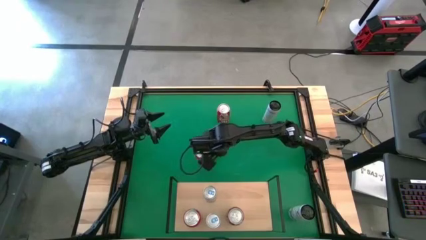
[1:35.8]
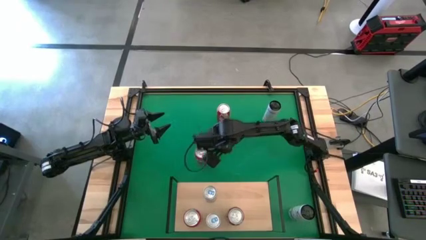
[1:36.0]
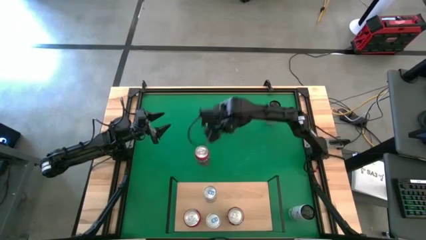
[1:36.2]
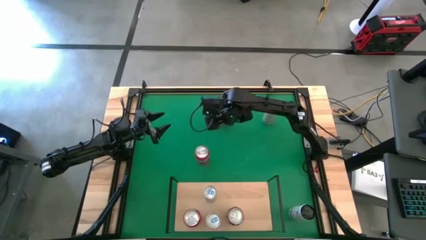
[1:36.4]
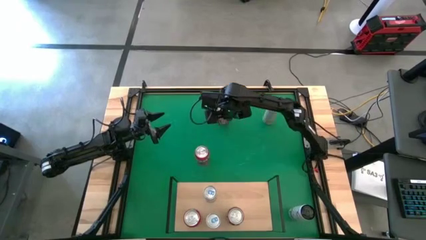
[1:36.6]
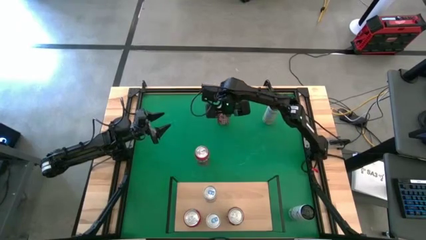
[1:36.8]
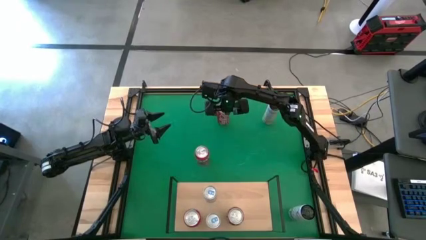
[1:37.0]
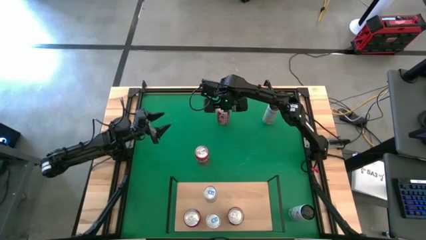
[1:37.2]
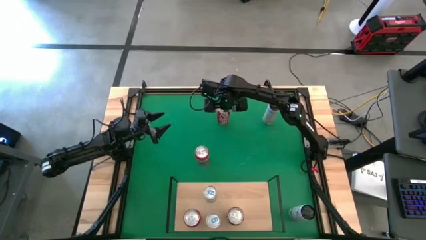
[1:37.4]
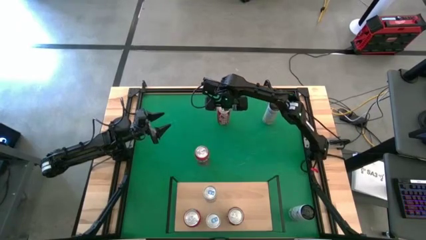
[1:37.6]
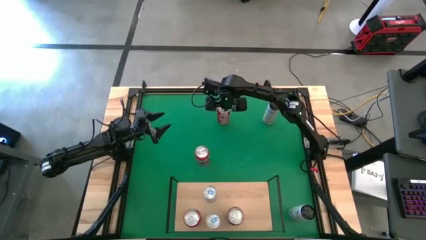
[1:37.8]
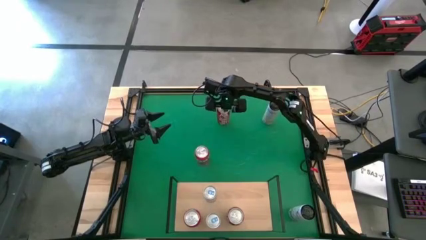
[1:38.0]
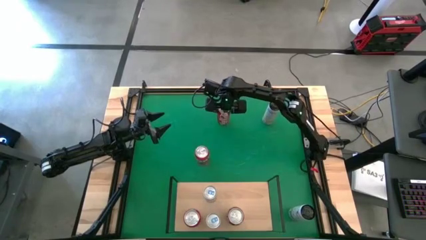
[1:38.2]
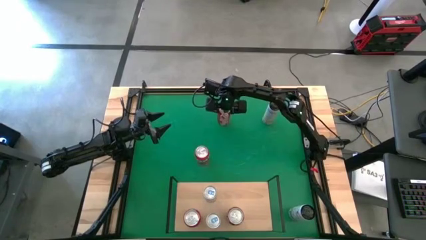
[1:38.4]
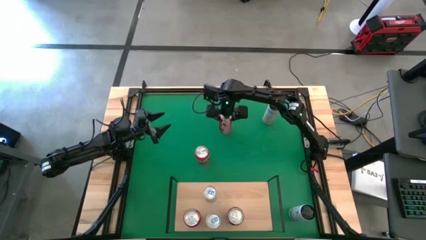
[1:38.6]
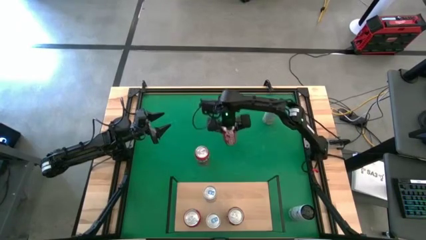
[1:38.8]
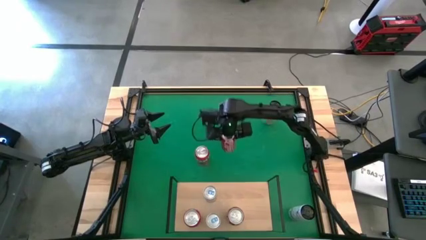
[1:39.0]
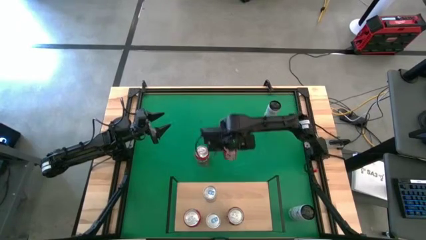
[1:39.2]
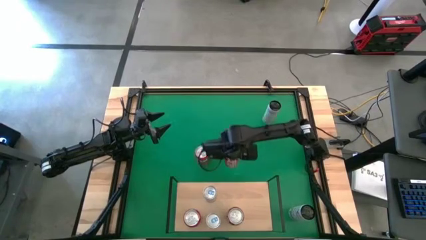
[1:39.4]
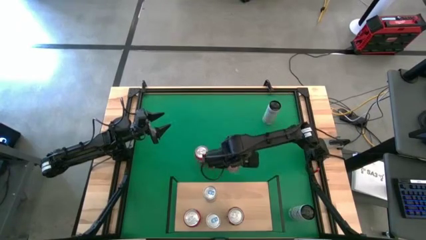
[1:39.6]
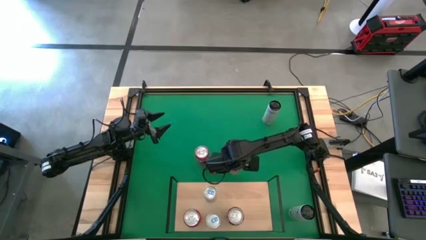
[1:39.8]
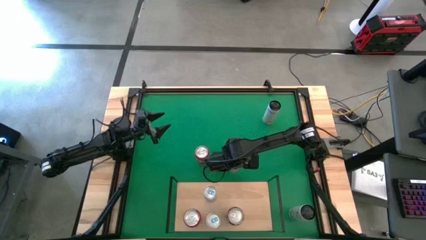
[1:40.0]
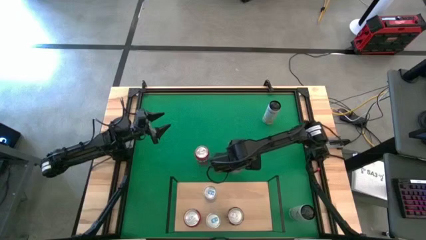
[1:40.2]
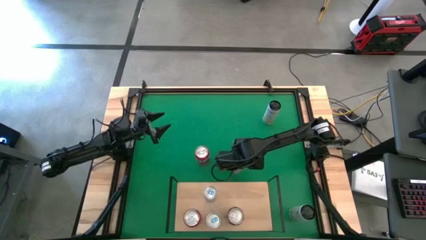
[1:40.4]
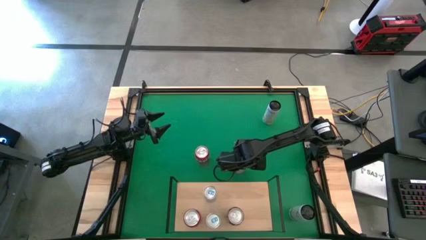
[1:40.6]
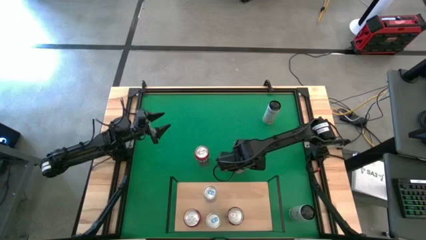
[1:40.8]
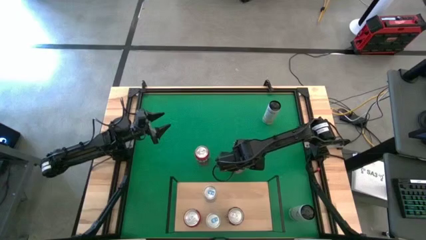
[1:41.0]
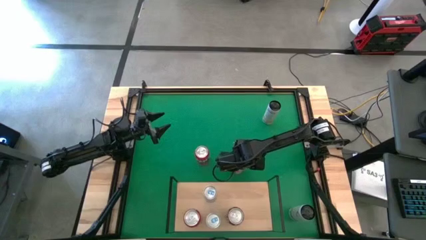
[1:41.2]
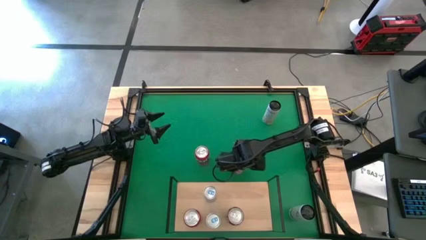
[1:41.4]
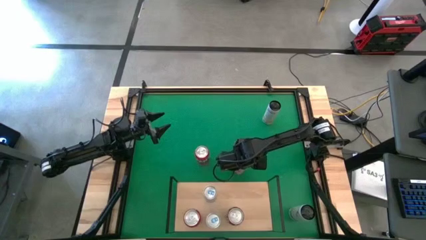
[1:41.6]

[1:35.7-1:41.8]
Task: Place canned beverage on shelf
Move the red soda can to the center of the table beside the orange soda can

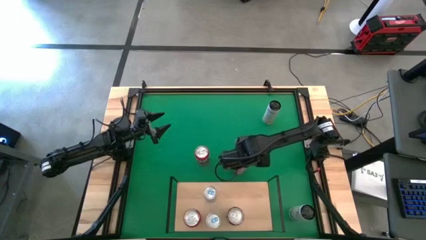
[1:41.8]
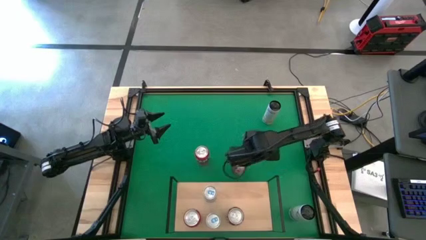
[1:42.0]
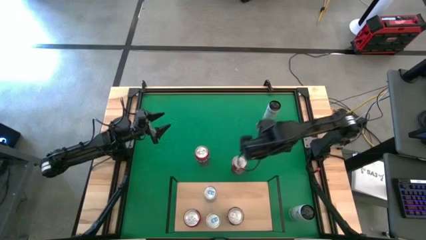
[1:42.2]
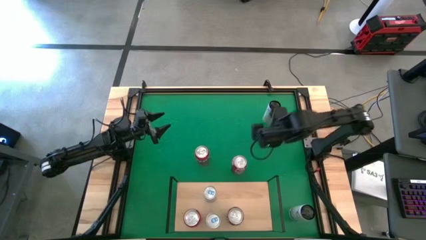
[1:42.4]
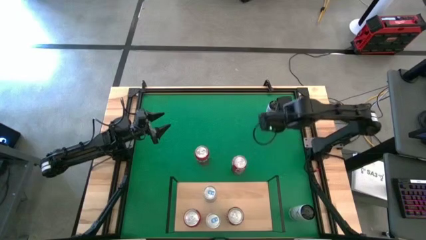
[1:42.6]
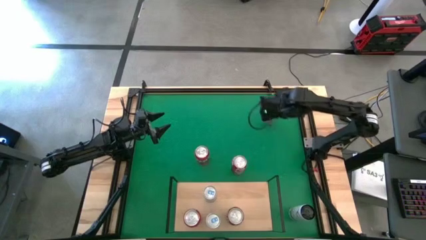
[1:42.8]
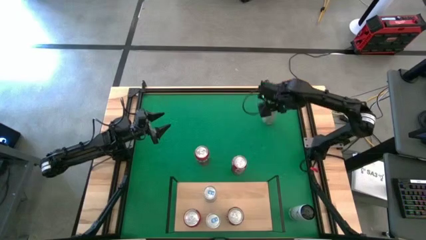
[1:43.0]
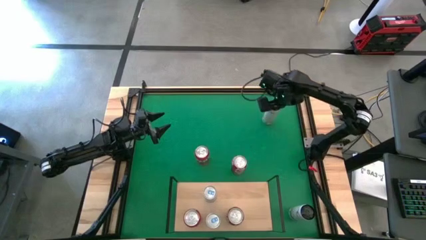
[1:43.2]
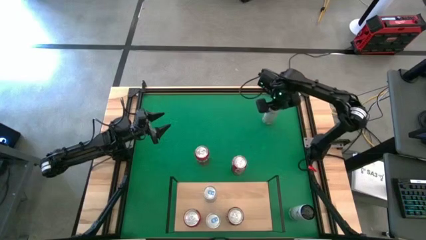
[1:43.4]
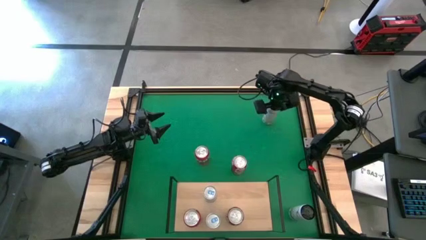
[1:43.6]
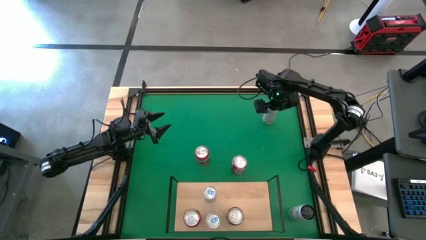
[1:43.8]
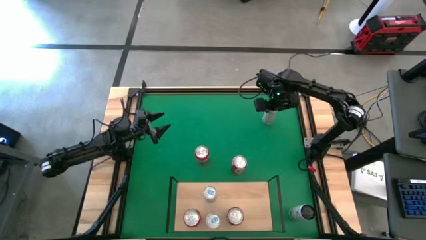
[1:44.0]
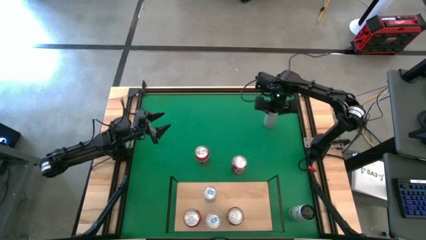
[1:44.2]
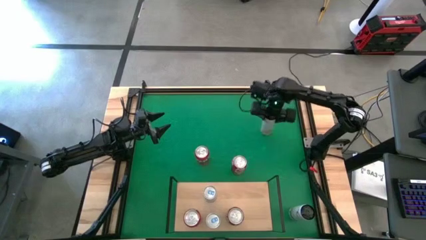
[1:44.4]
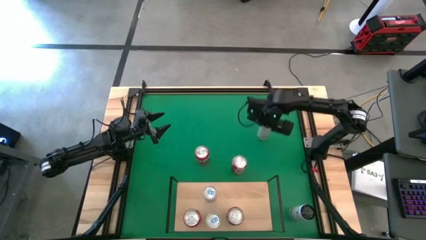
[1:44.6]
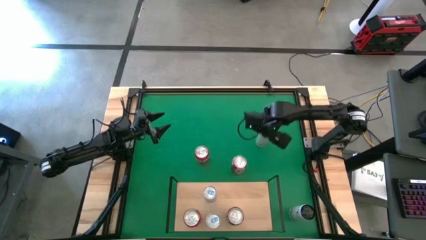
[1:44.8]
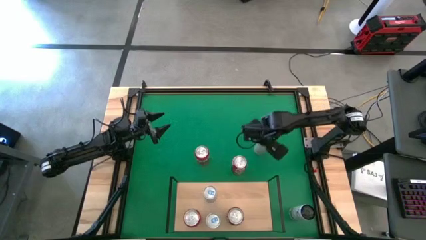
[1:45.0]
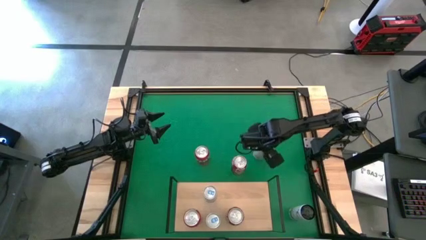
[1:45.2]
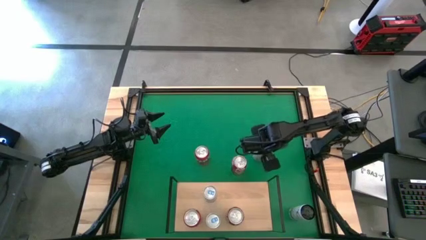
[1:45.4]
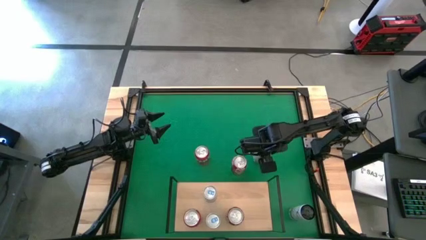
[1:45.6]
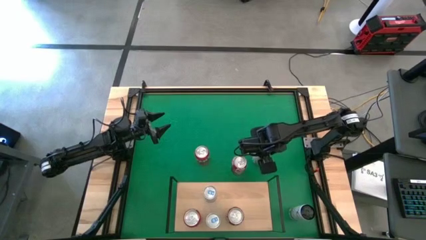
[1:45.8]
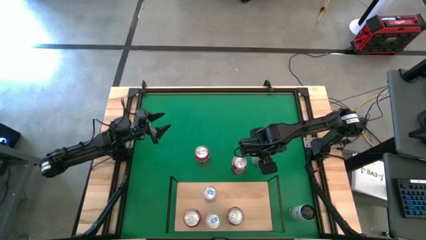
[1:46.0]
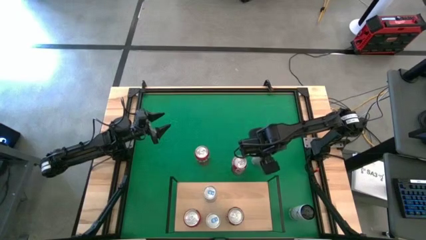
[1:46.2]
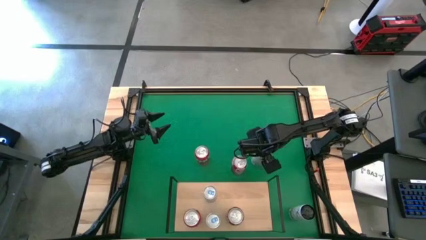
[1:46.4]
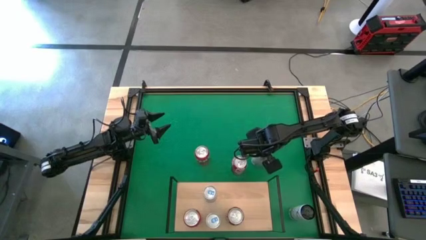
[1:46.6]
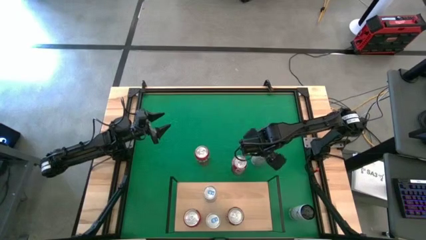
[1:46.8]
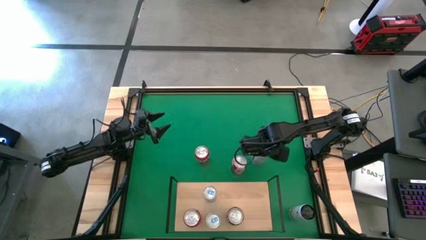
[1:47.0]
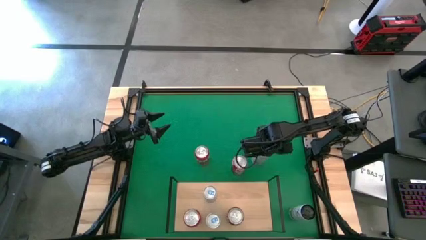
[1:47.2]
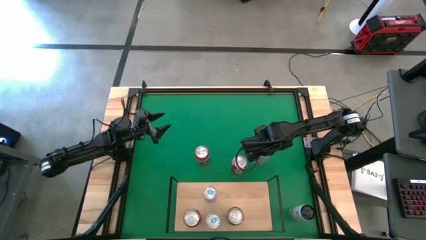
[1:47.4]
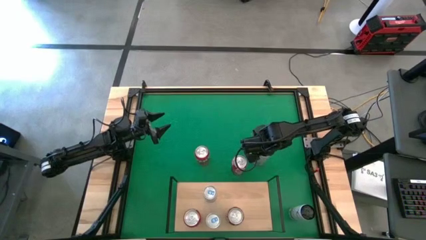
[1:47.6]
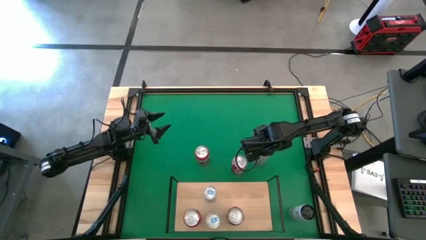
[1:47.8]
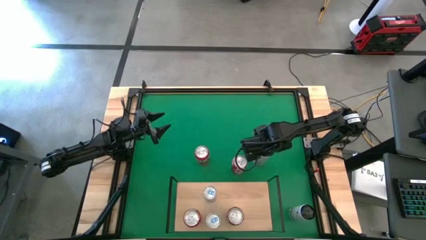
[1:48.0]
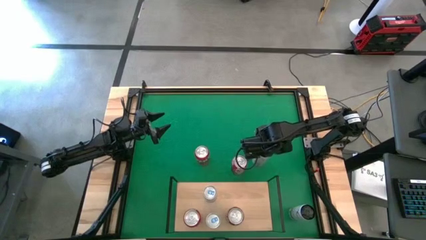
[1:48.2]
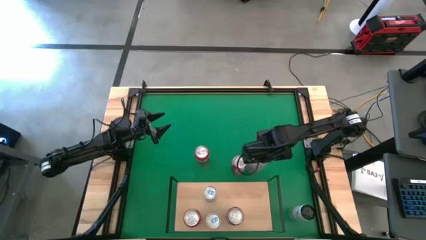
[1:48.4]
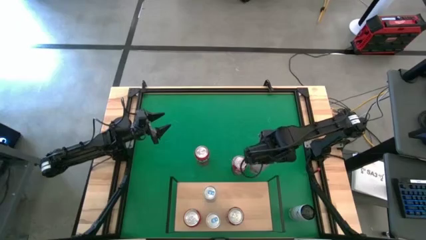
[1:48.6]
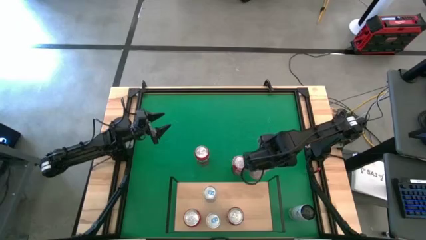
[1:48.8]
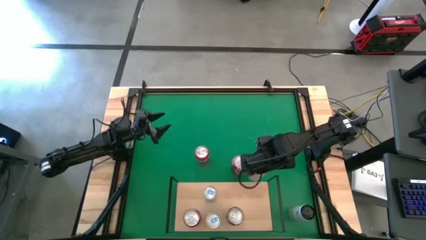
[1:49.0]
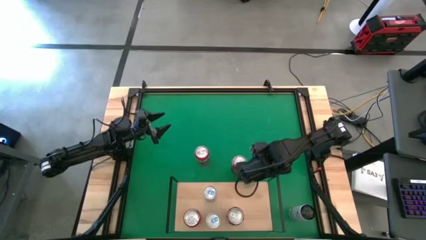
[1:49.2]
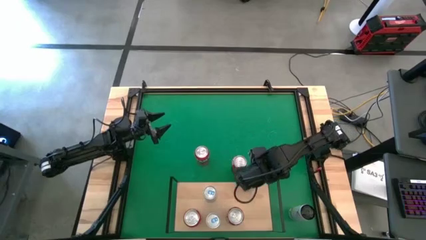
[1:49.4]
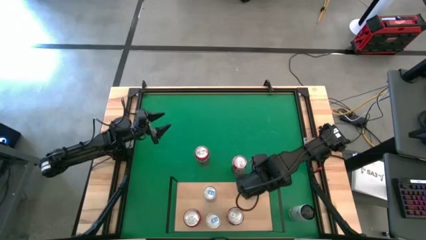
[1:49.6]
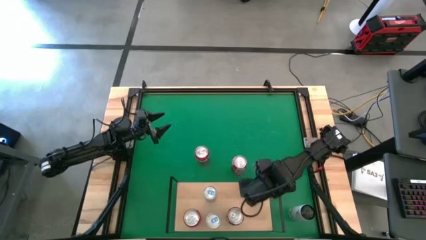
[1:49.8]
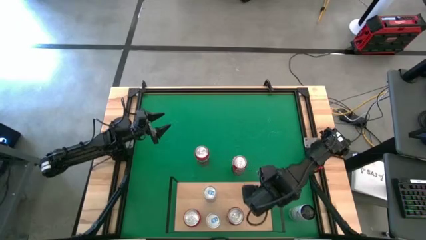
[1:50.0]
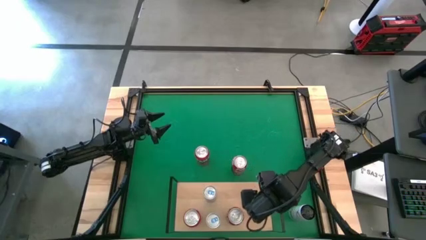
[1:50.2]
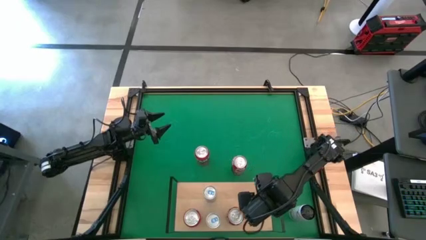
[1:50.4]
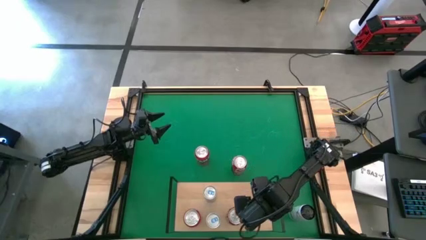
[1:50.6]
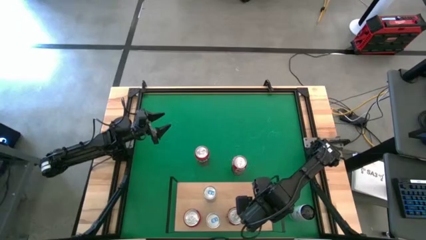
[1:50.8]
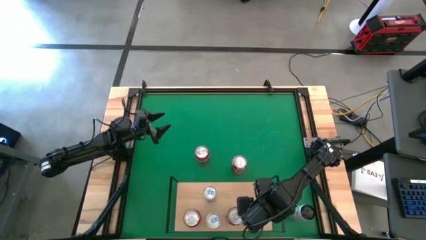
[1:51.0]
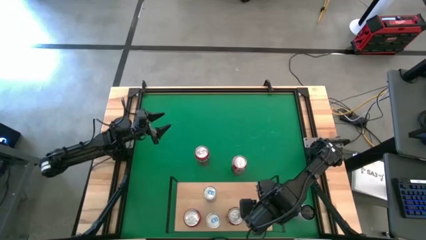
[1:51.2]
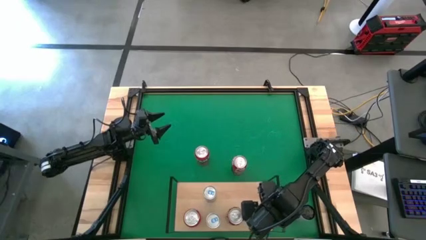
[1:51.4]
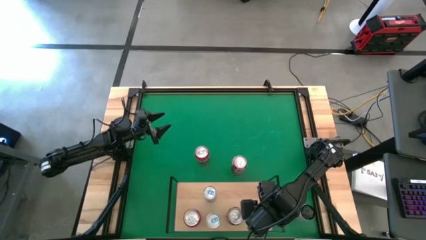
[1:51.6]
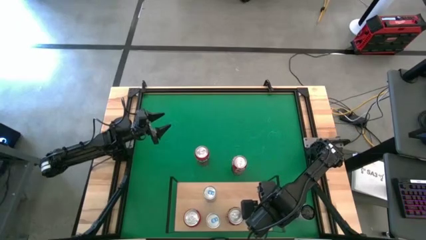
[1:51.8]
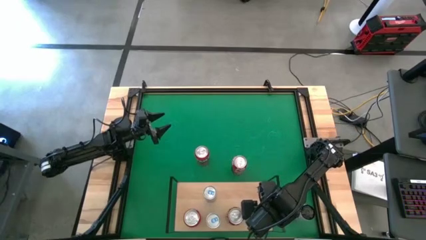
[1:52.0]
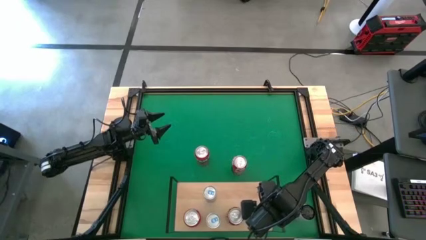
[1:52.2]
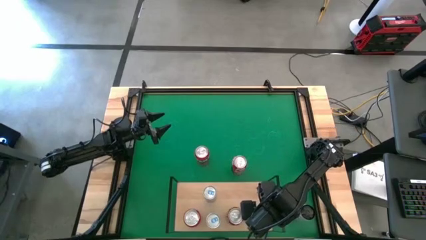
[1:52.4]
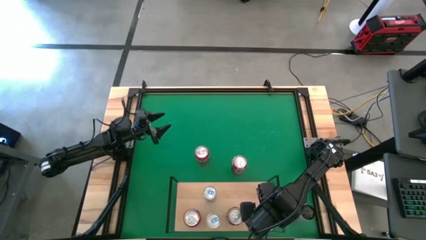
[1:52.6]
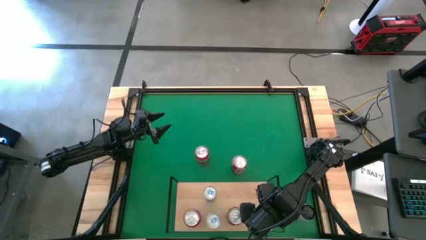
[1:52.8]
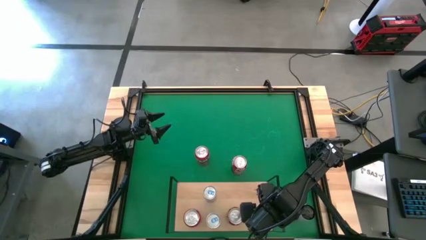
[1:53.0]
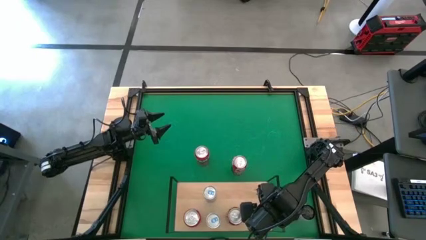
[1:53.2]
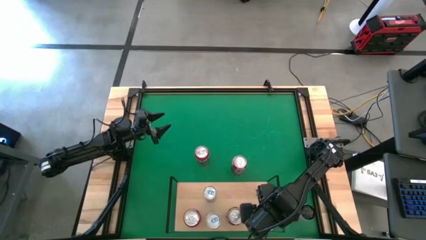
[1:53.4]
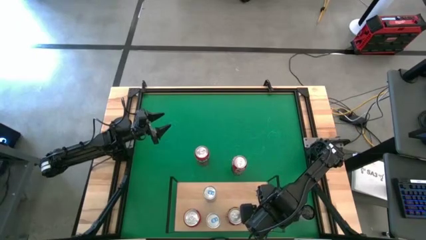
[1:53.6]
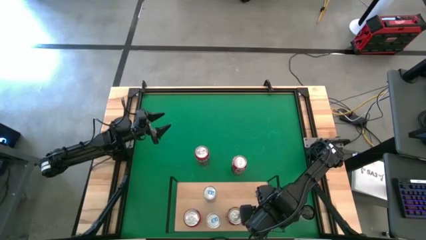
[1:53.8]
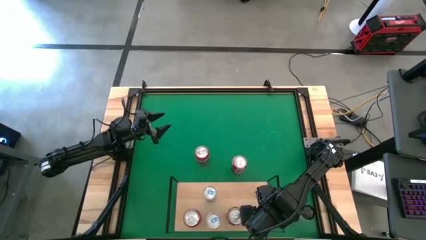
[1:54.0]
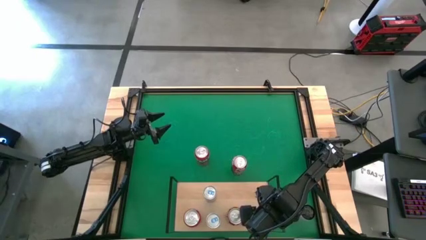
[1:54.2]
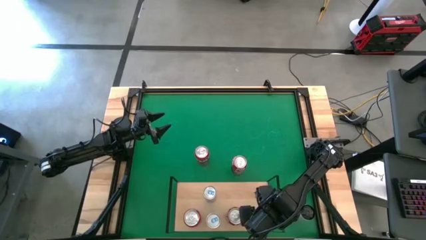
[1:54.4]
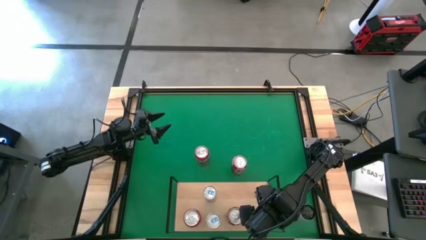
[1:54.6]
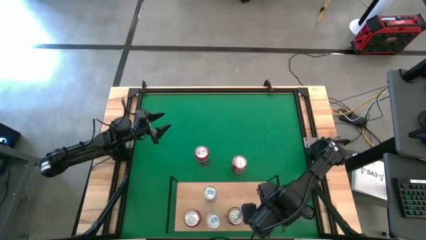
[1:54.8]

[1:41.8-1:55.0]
Put the top white soda can on the shelf
